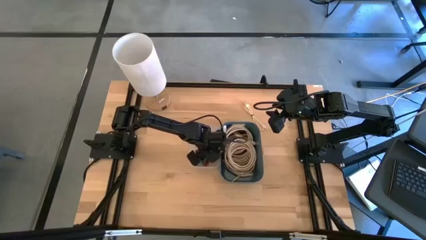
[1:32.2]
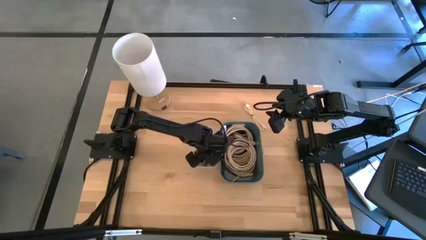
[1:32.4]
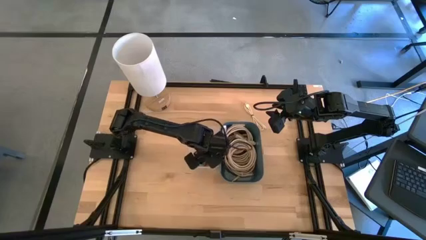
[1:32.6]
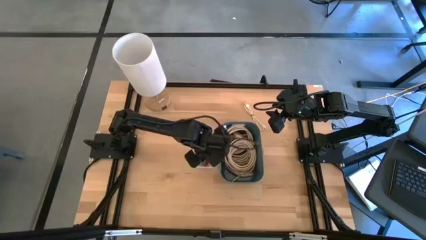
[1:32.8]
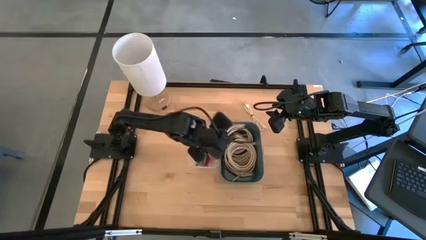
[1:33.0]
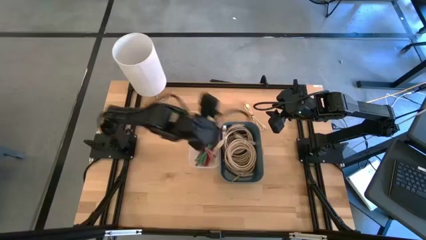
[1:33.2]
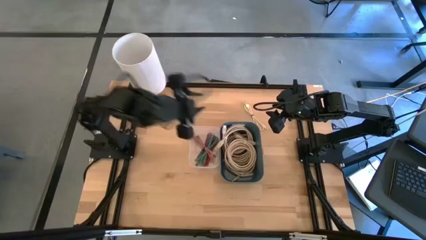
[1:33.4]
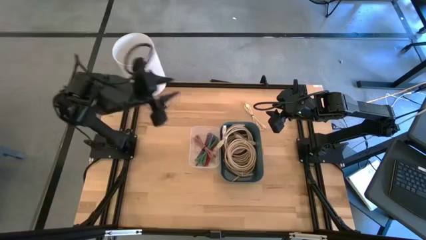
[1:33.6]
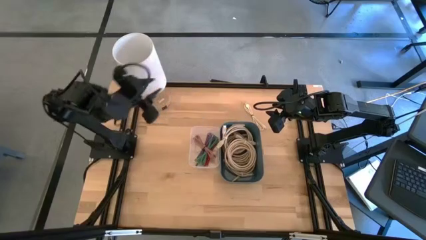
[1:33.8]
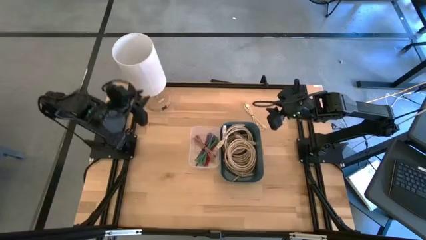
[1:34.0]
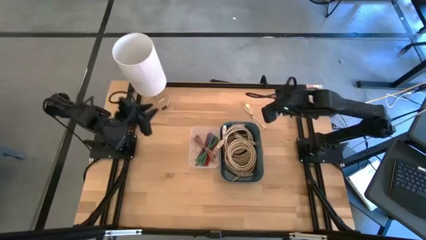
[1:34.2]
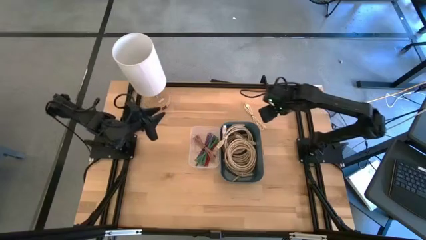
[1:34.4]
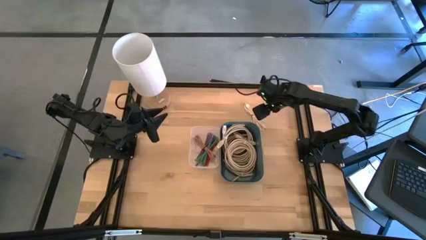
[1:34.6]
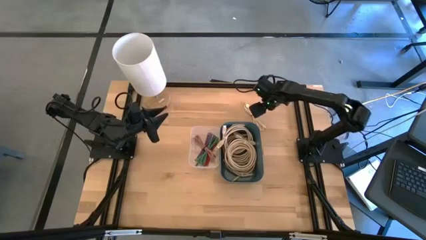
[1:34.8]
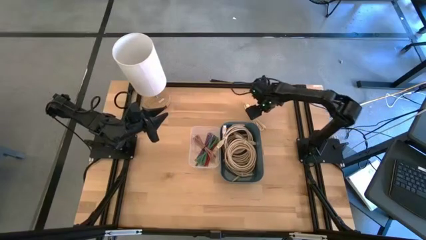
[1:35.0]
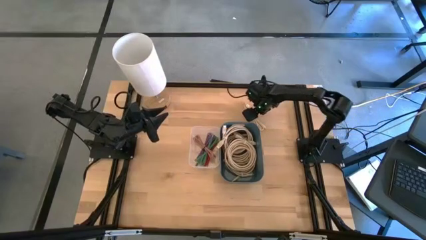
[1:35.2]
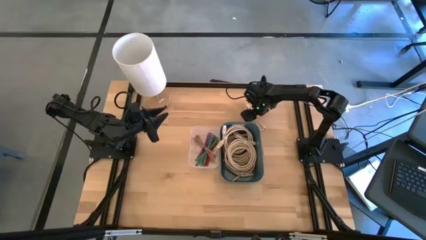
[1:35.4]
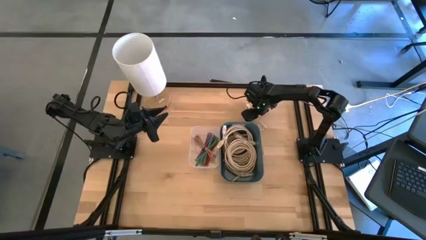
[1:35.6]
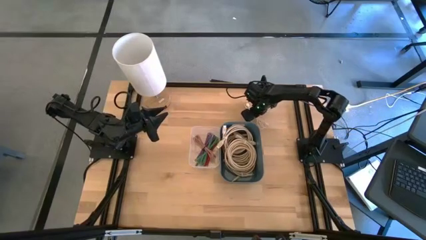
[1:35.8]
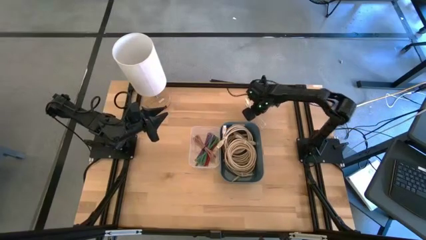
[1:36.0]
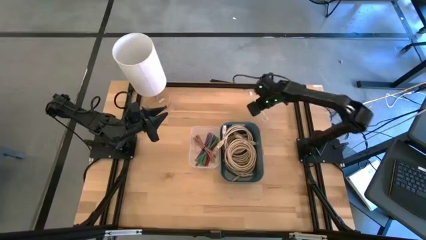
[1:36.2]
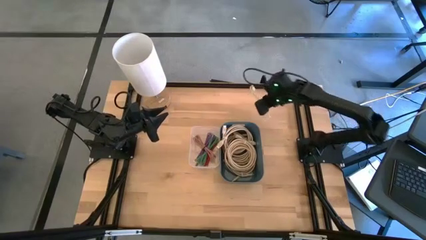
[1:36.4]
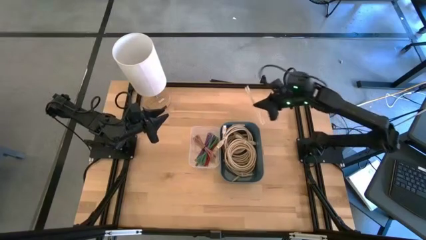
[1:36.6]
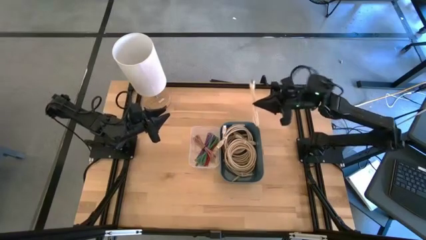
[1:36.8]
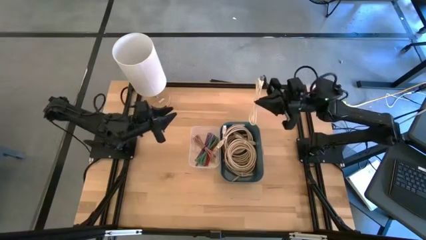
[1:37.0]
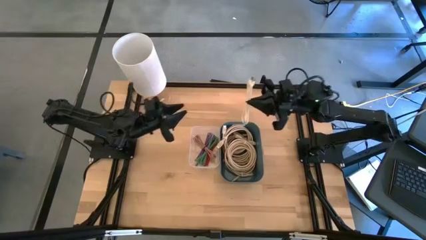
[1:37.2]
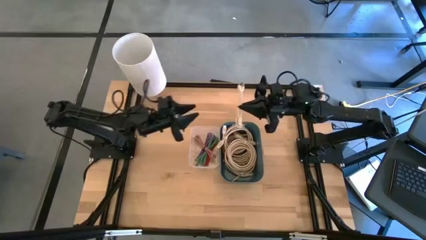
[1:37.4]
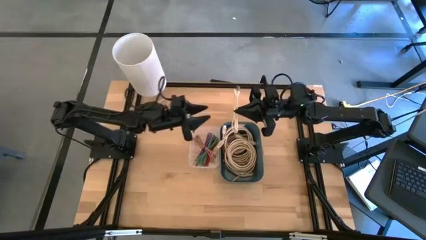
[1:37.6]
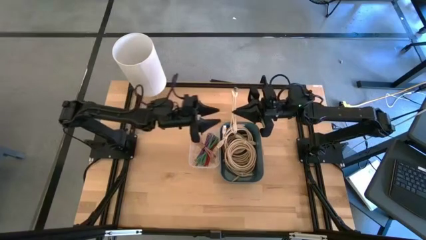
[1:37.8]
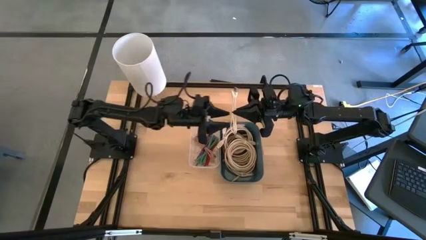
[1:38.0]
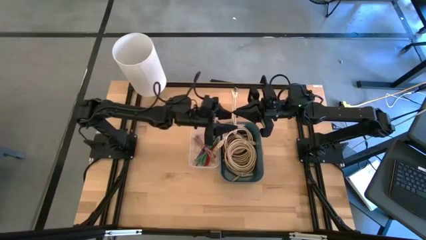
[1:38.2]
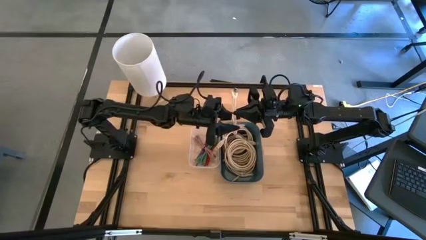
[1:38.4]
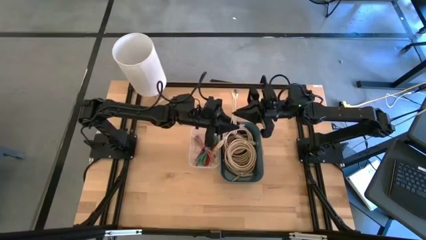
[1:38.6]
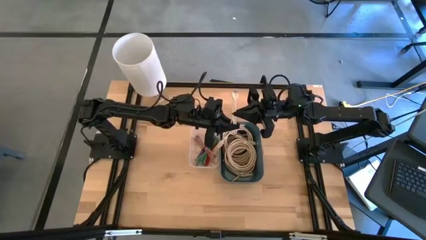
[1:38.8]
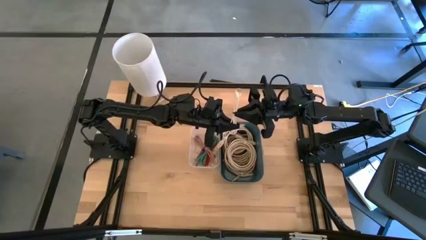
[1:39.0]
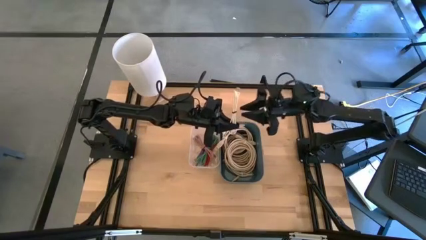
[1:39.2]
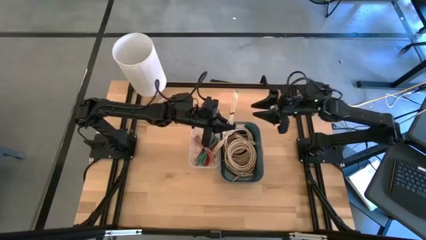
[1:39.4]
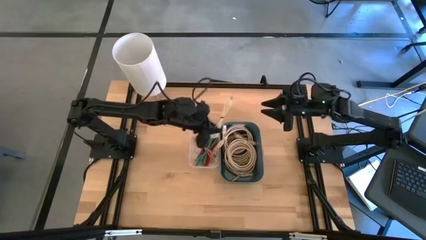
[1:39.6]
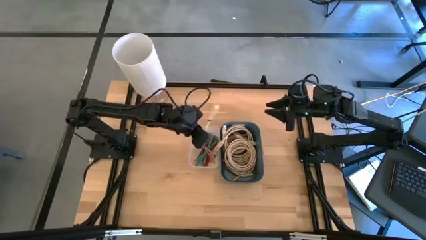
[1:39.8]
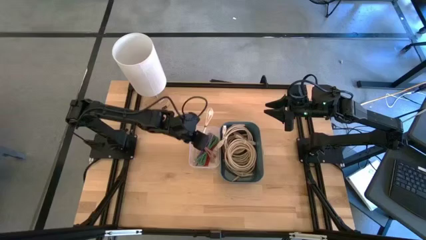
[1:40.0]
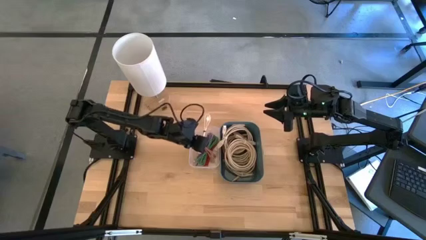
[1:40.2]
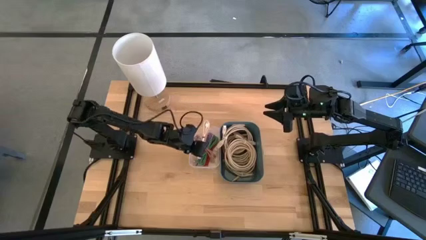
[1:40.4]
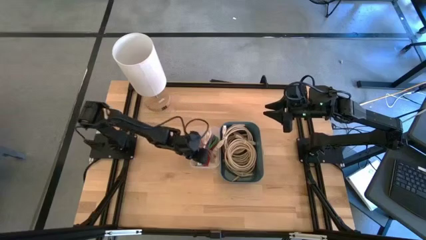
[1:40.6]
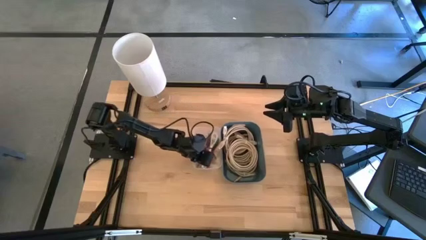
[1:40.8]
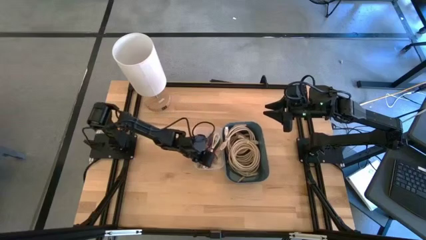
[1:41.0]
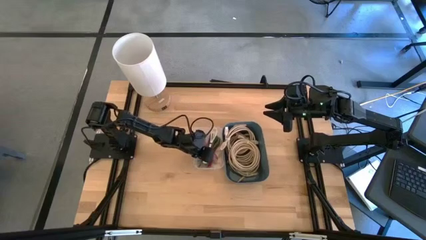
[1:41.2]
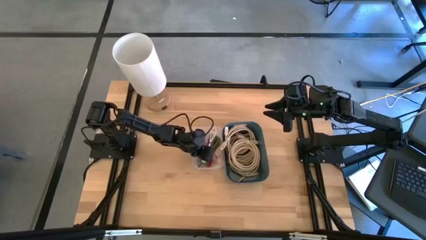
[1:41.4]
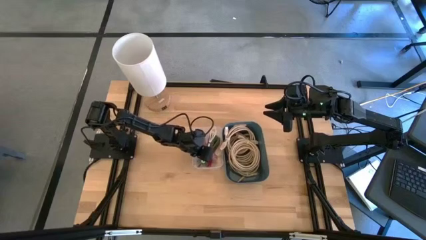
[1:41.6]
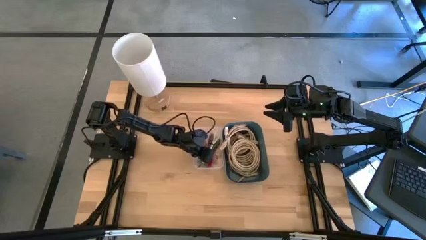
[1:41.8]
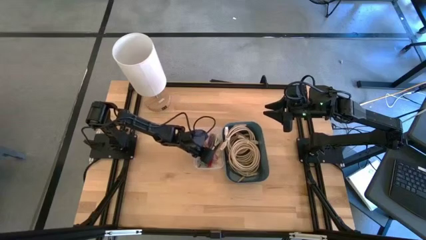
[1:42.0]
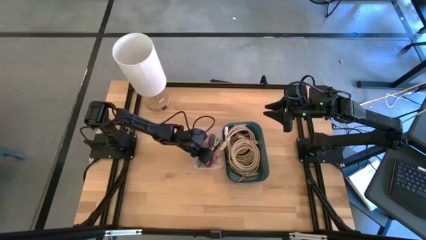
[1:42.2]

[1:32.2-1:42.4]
Put the white charger cable into the white transparent bin

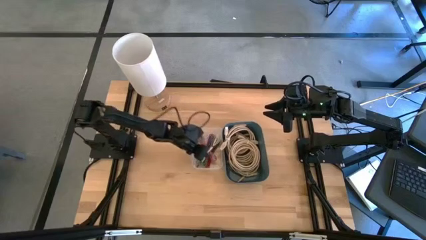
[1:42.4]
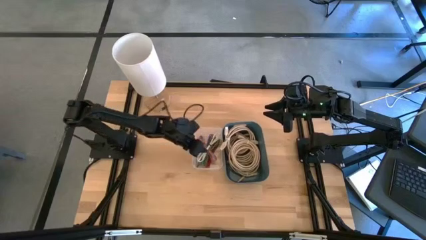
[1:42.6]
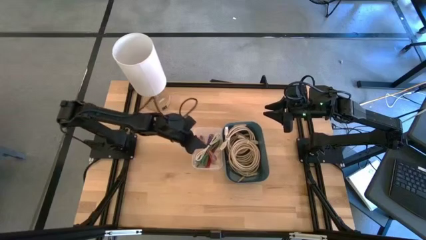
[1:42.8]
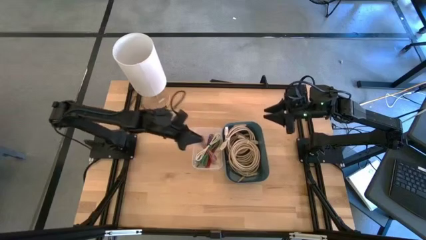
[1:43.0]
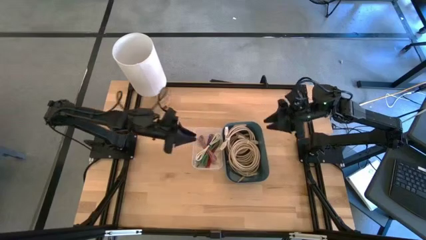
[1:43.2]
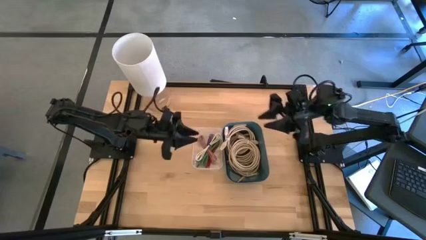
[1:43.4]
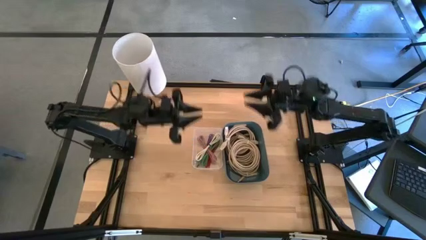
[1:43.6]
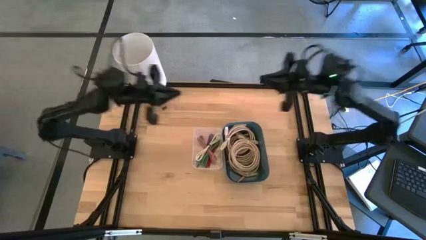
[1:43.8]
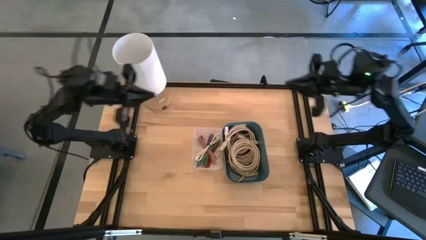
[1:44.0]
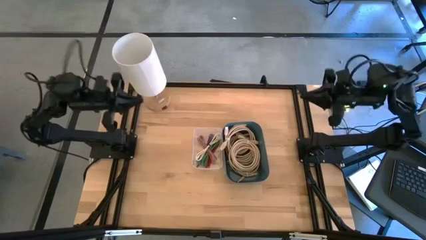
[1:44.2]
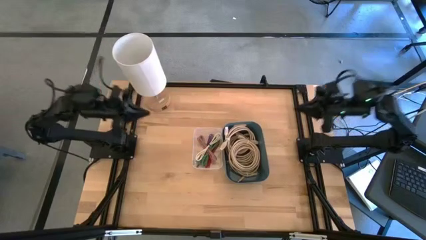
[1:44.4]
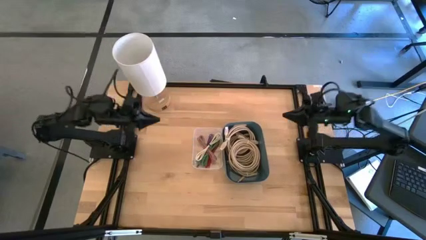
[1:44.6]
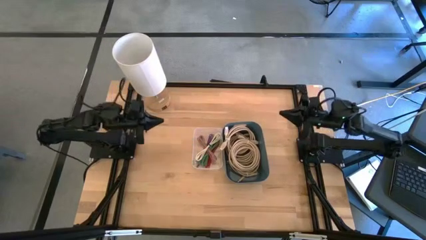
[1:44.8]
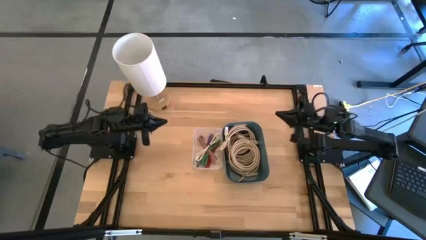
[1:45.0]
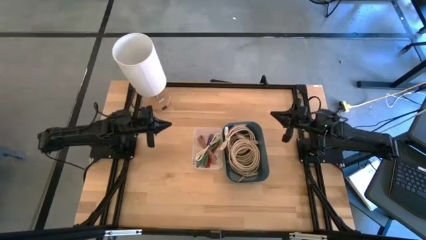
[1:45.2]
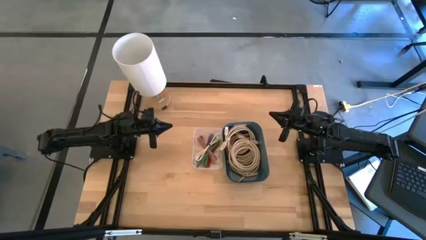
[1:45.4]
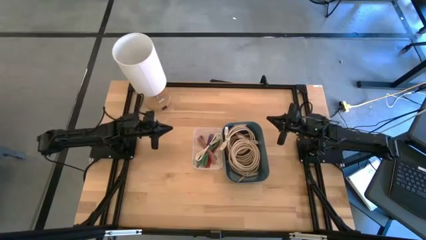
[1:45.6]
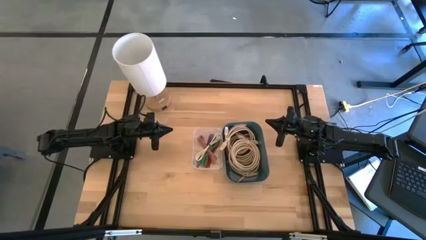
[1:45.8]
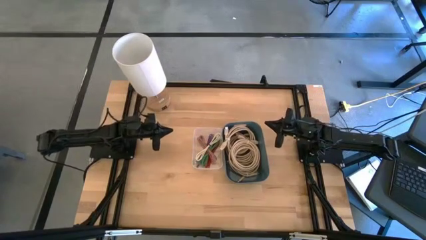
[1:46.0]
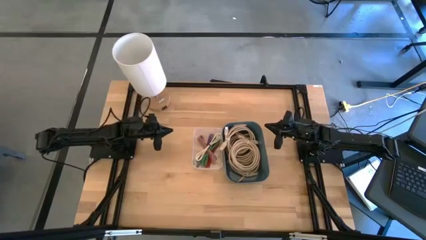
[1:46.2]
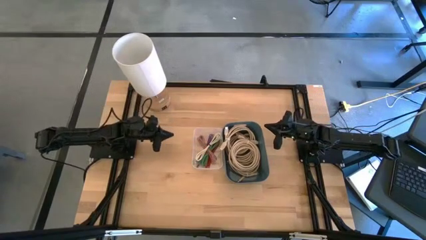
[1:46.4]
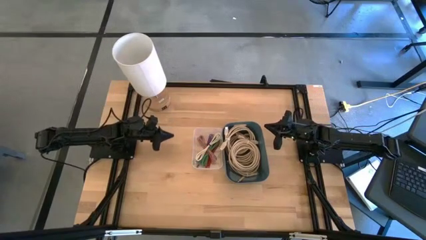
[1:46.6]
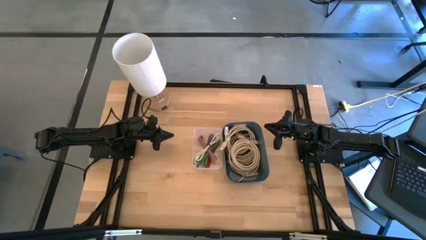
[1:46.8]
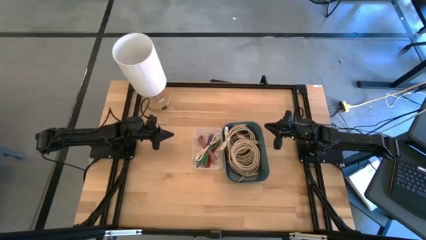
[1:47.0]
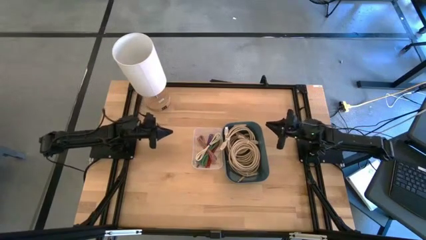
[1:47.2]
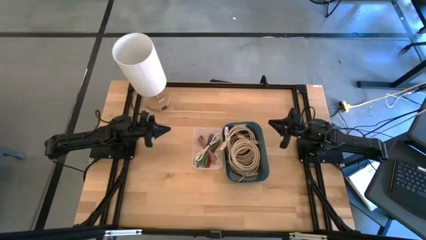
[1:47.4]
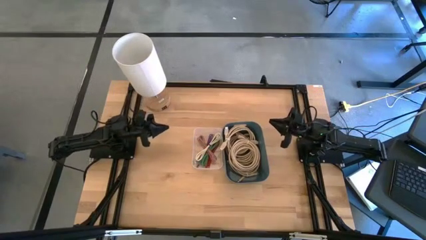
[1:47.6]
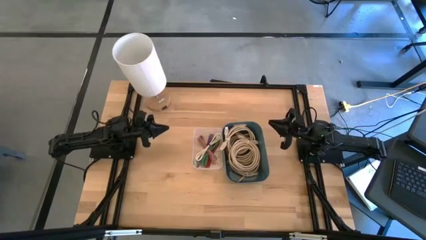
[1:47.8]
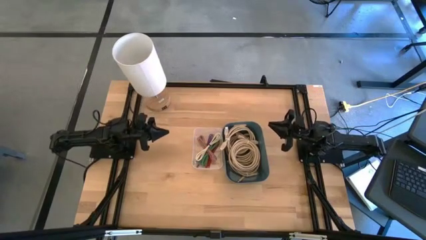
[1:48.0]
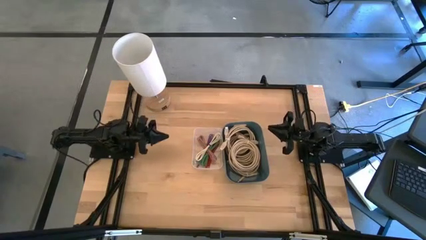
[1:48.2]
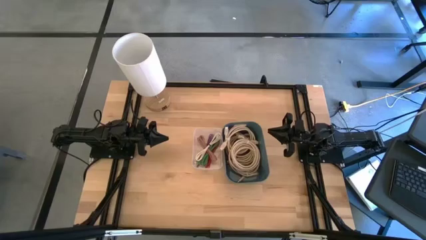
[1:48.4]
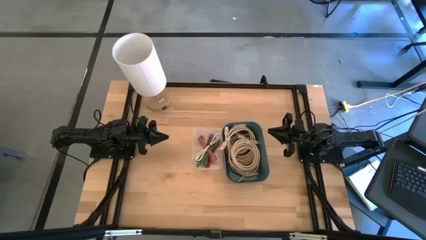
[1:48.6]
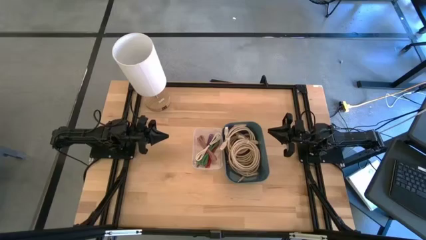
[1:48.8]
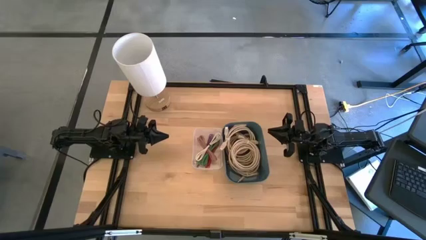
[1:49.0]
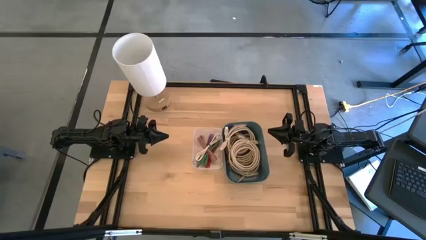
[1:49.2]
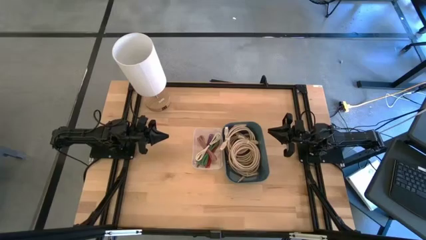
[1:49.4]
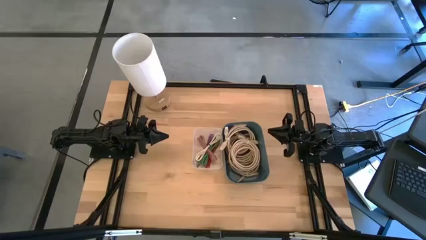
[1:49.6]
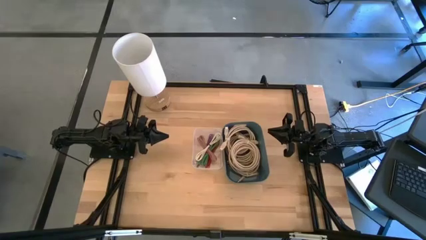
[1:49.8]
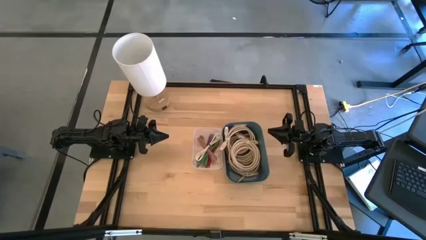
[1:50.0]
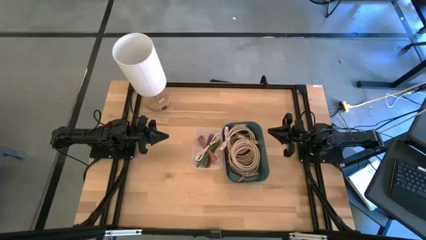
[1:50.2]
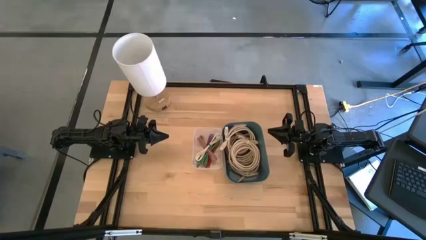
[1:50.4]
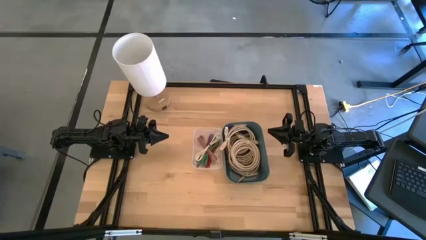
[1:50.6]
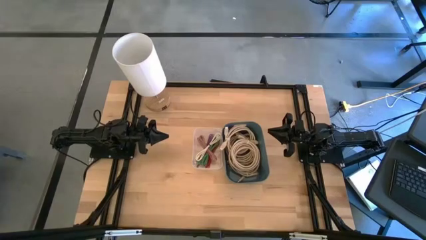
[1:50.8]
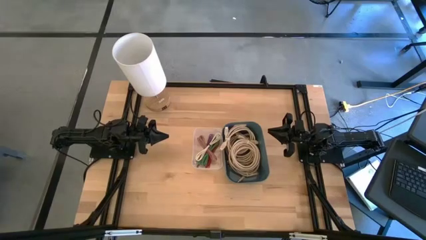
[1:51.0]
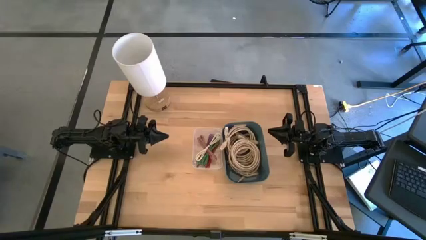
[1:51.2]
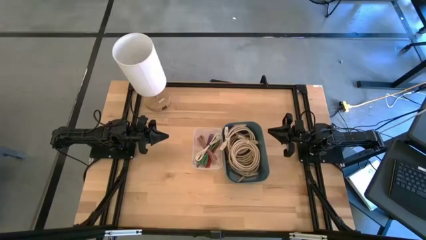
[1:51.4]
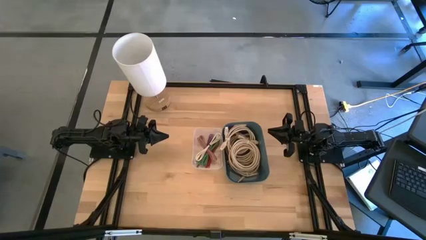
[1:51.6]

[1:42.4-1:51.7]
Return to Home Position
